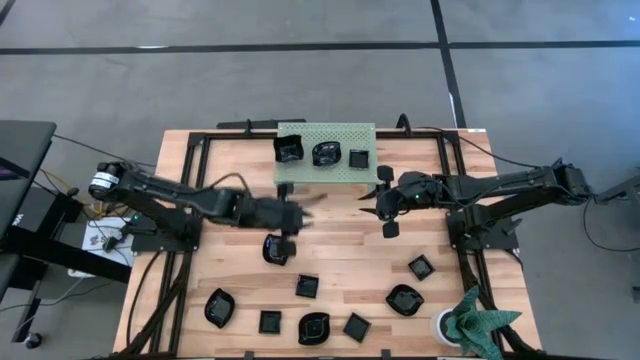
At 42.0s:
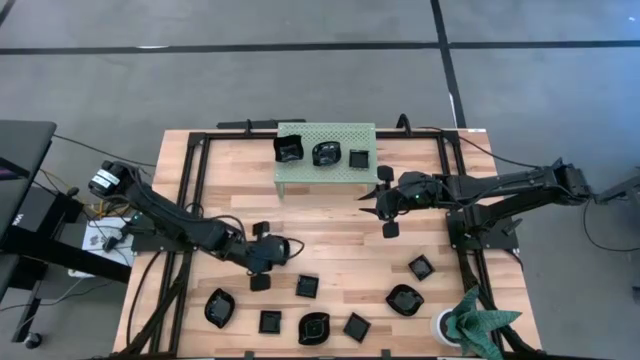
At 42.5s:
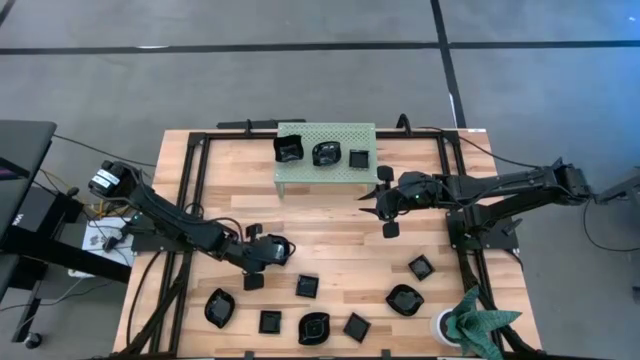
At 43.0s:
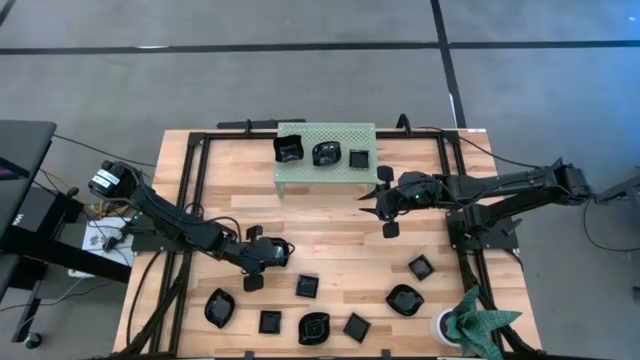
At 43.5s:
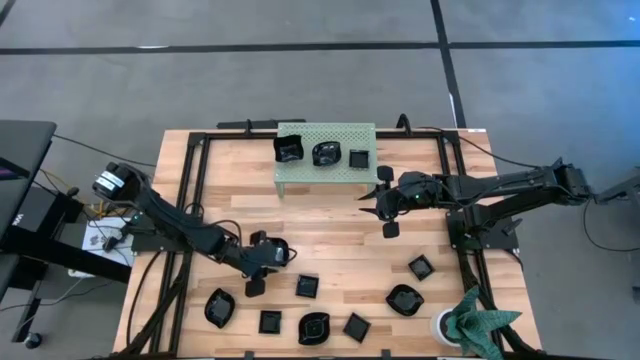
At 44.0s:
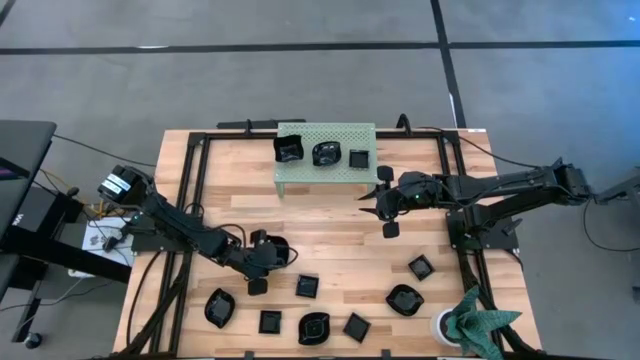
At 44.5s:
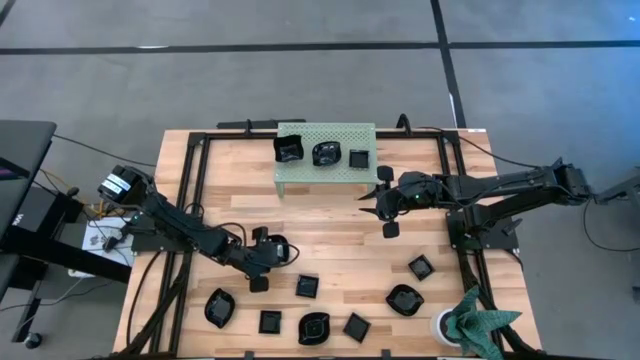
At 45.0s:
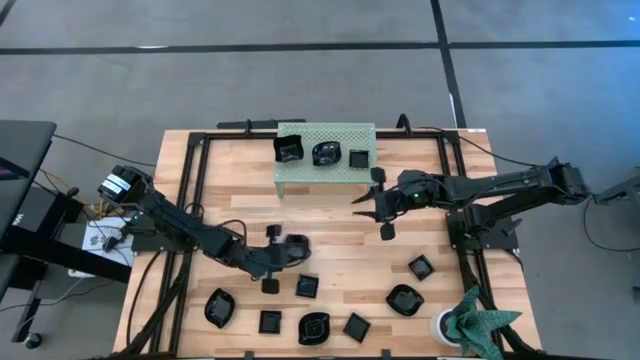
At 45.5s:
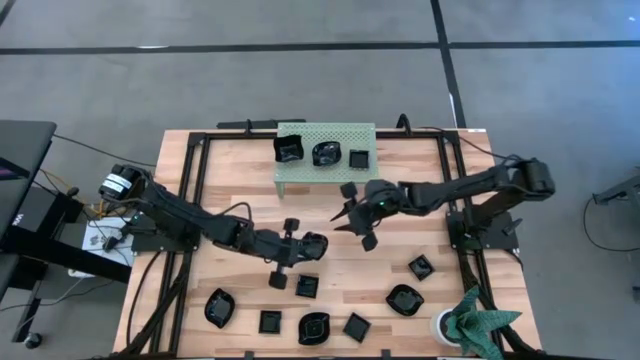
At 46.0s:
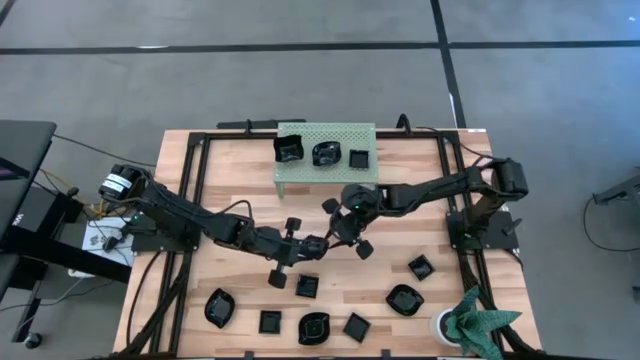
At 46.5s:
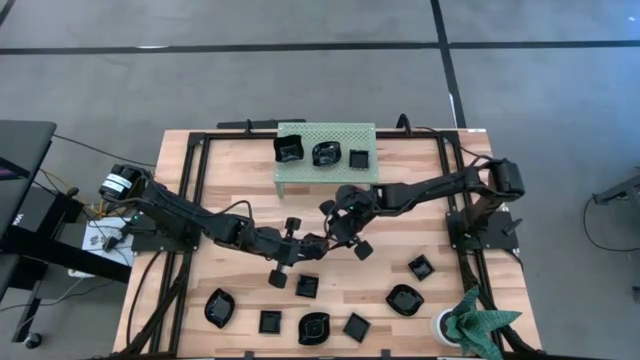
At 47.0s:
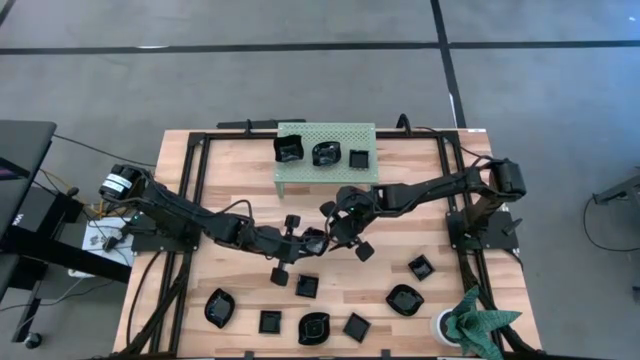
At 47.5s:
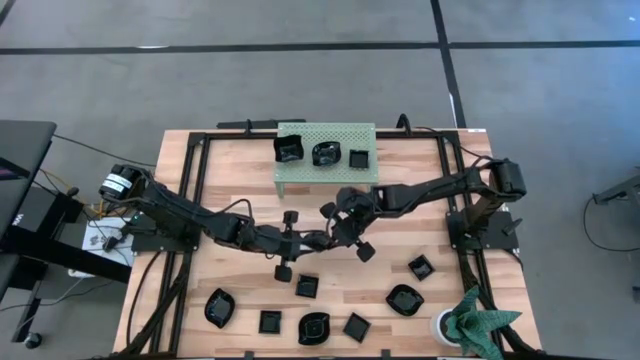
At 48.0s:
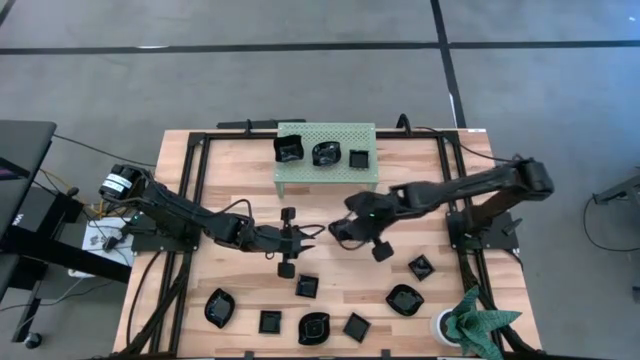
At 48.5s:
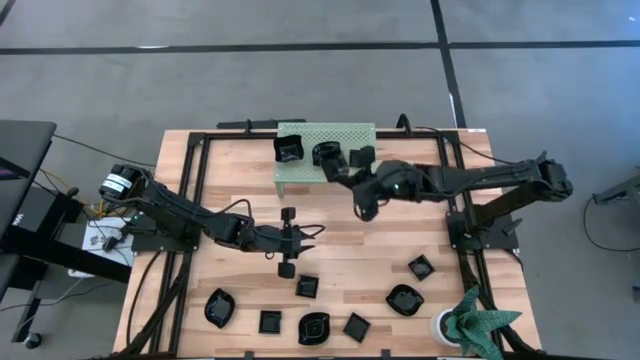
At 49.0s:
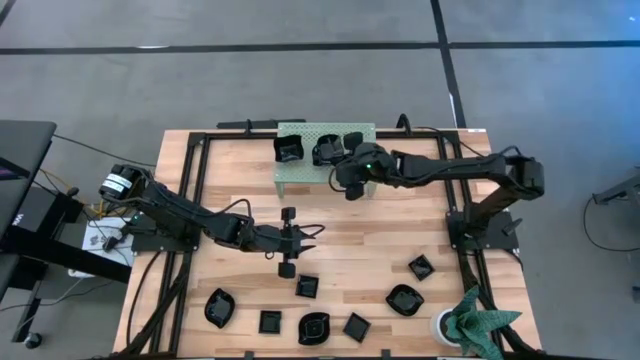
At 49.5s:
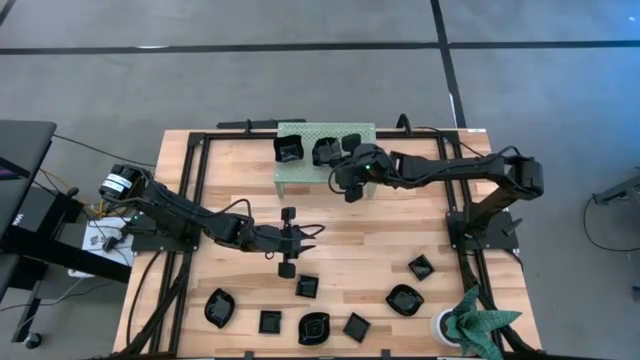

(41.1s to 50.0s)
Task: Pick & Place Mini shaped plates
Stack the leaf-shaped plate on the leaf-shaped plate on the shelf

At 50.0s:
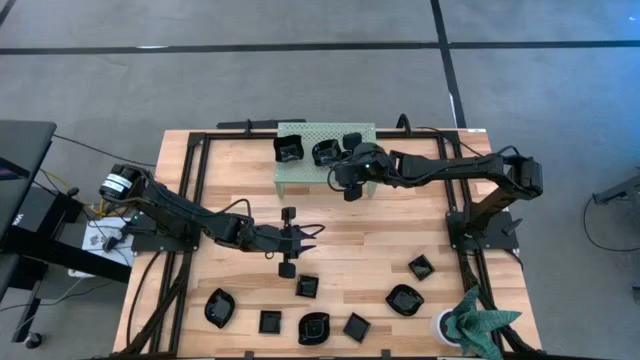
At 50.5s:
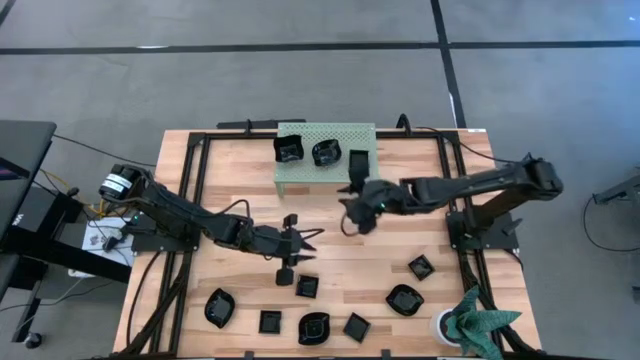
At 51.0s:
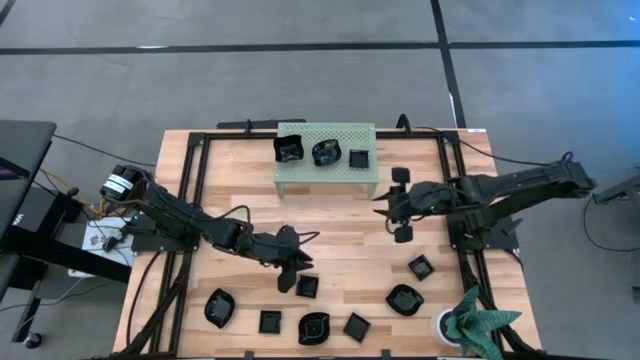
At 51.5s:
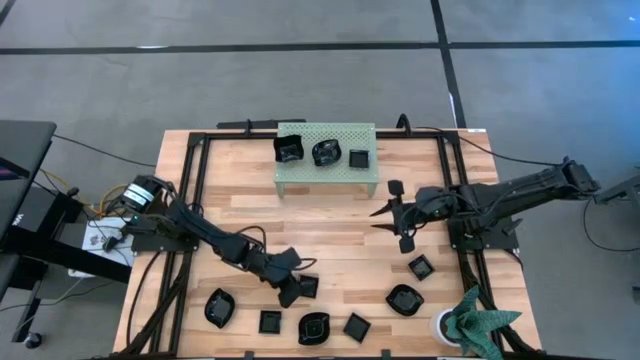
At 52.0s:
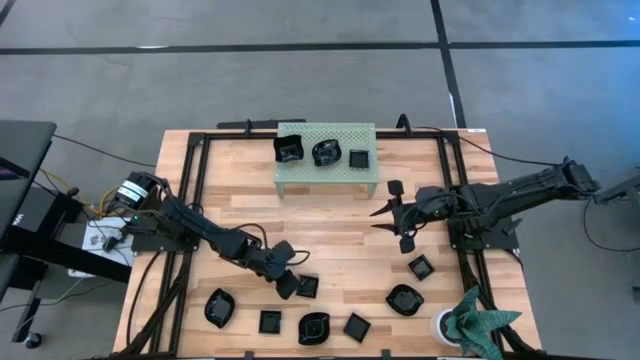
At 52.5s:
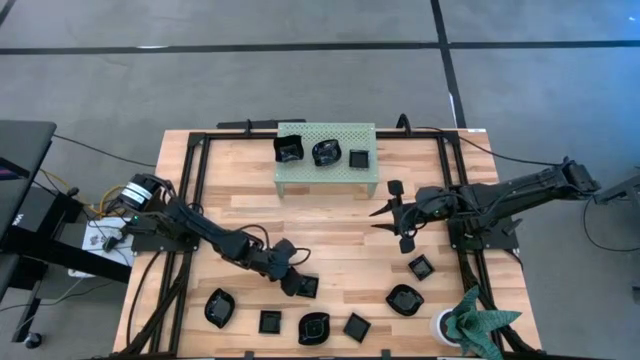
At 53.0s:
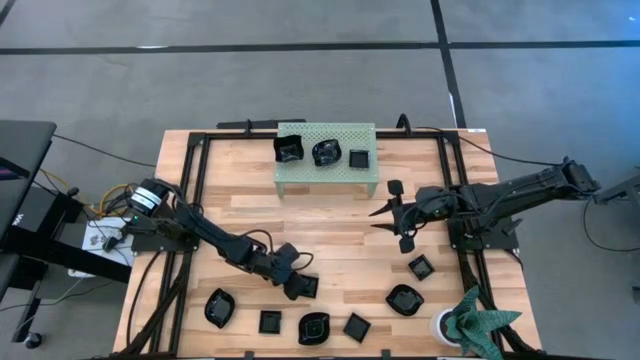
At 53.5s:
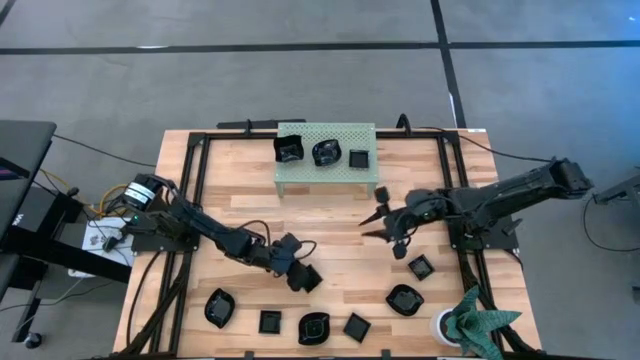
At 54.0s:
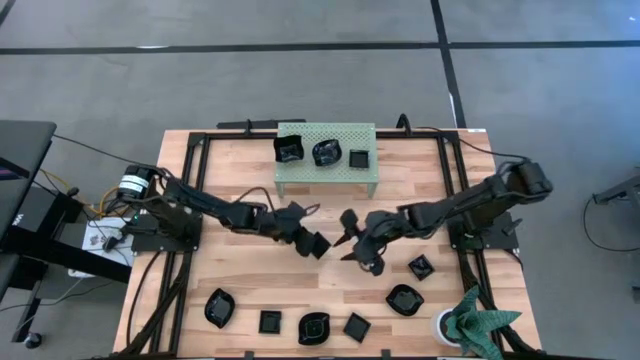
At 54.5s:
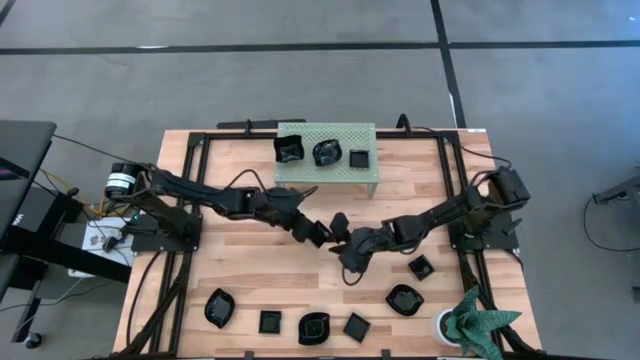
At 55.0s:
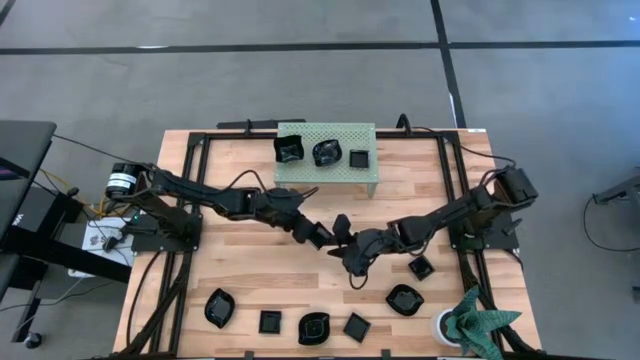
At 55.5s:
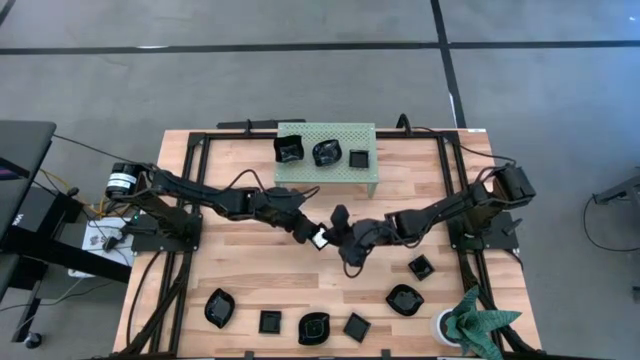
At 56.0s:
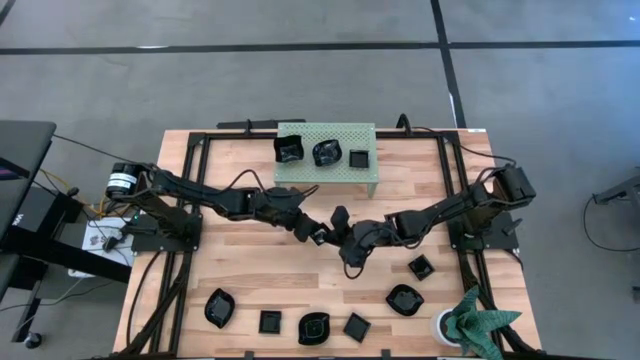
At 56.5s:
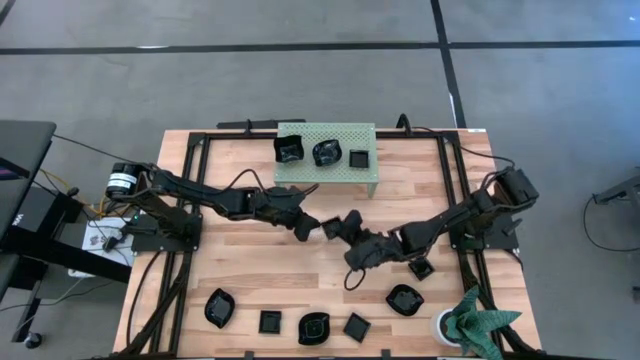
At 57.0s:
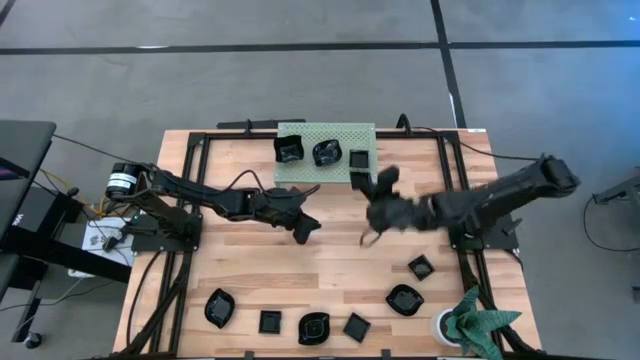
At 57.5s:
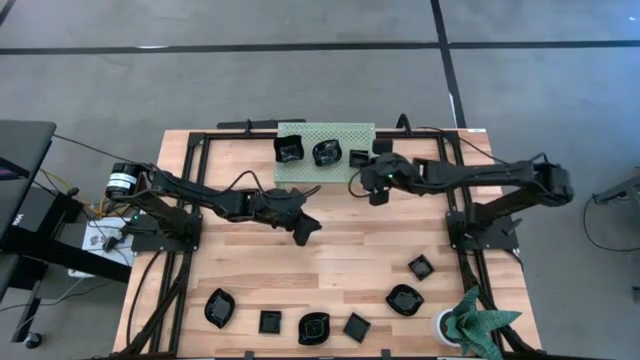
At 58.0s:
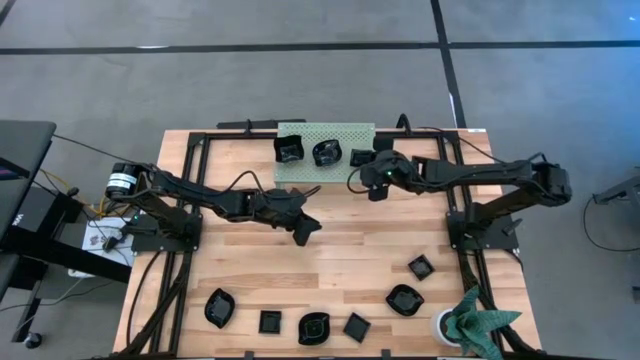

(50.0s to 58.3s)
Stack the square plate on the square plate on the shelf

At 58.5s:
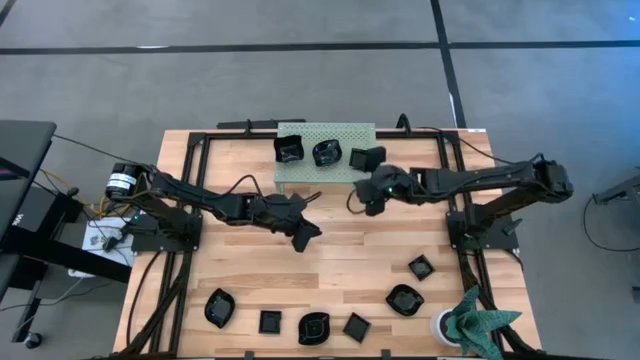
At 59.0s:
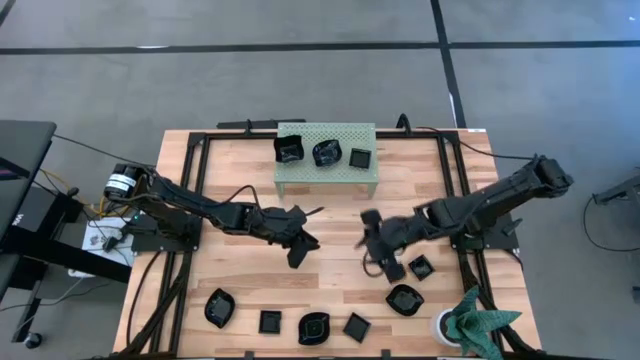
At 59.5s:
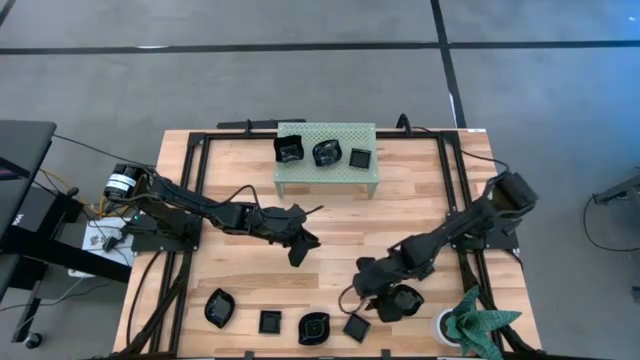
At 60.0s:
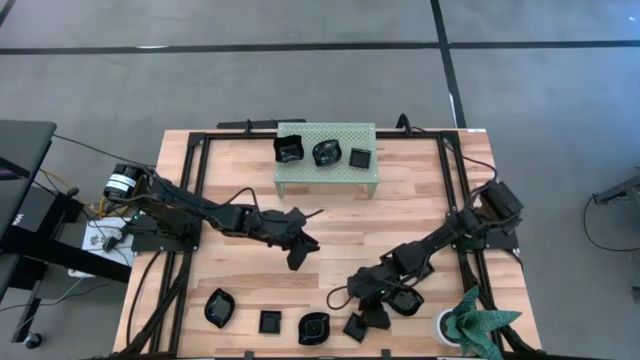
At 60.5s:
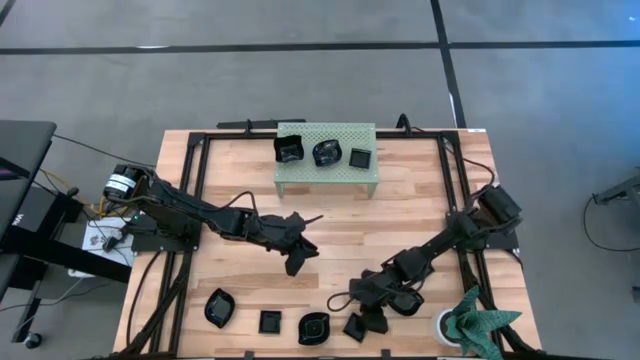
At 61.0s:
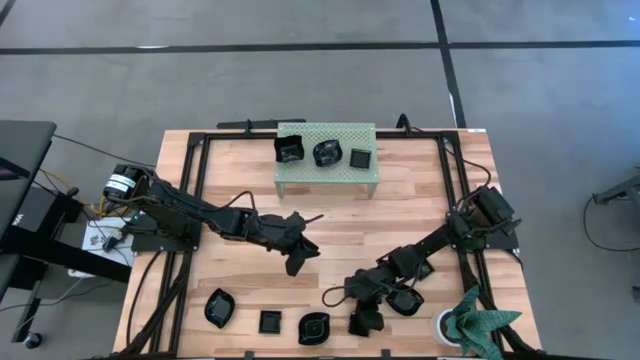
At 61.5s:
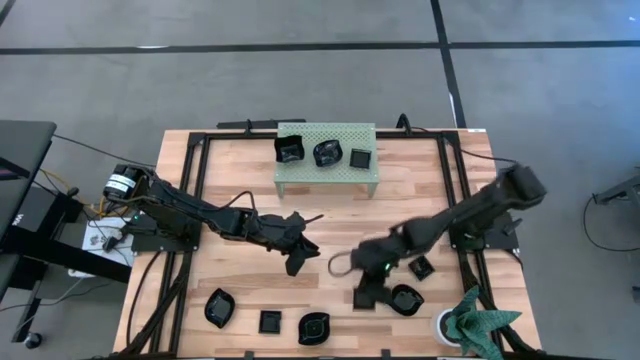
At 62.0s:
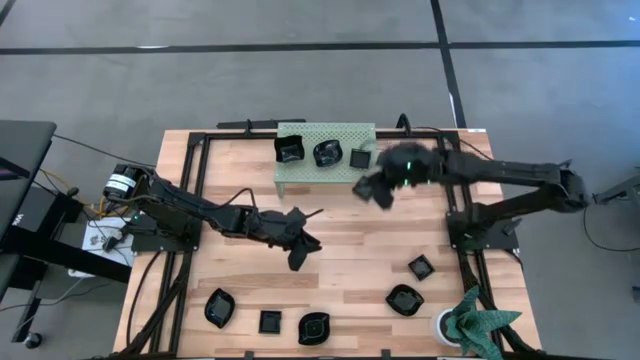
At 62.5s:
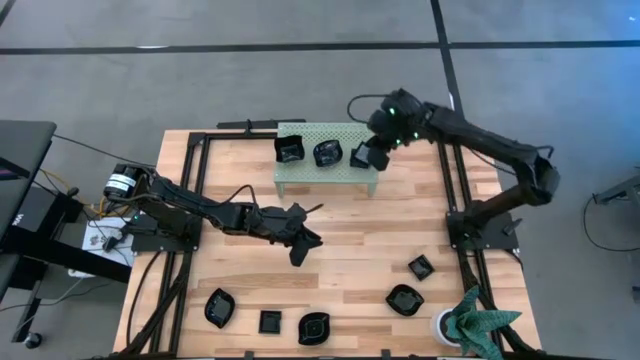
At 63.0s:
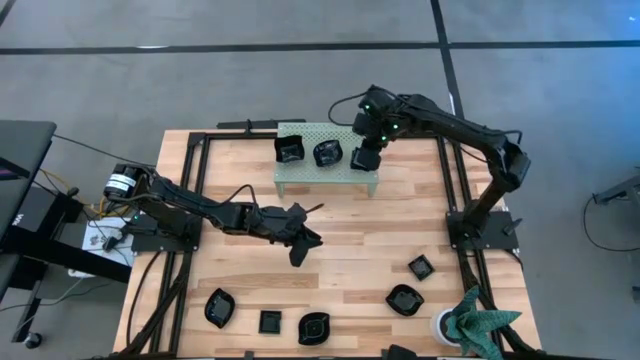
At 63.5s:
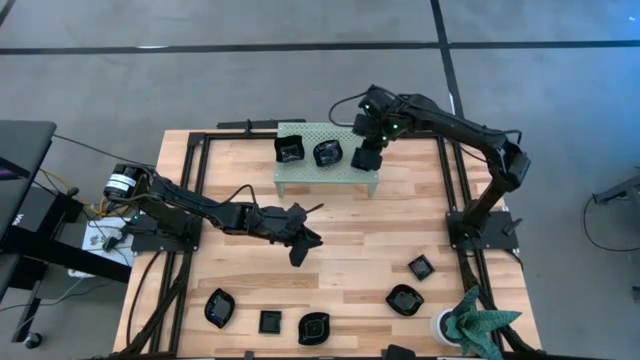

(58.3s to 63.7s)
Stack the square plate on the square plate on the shelf
